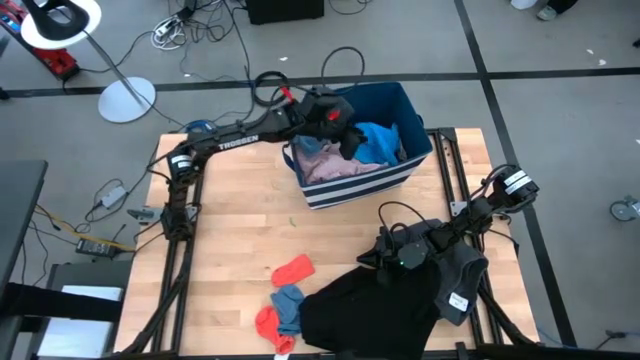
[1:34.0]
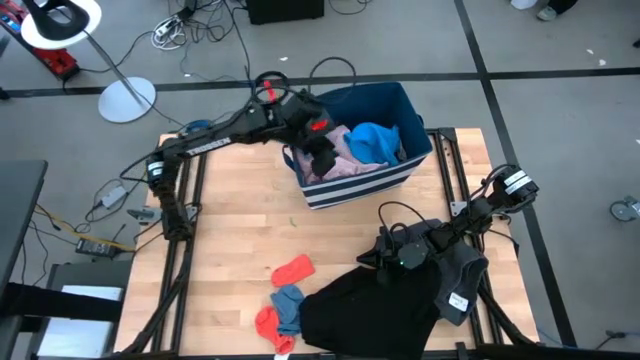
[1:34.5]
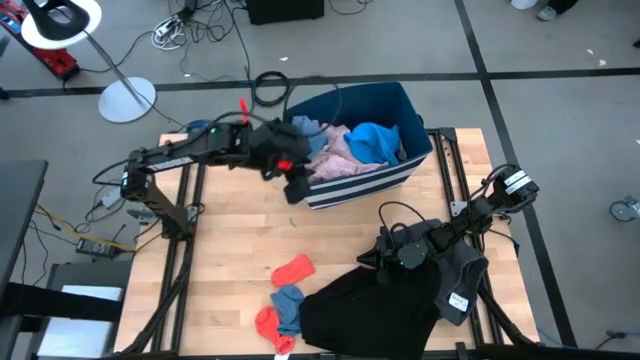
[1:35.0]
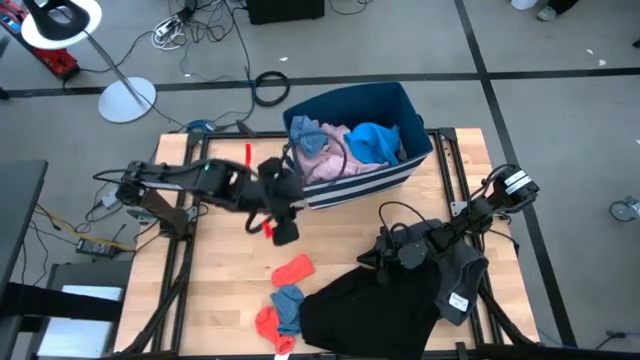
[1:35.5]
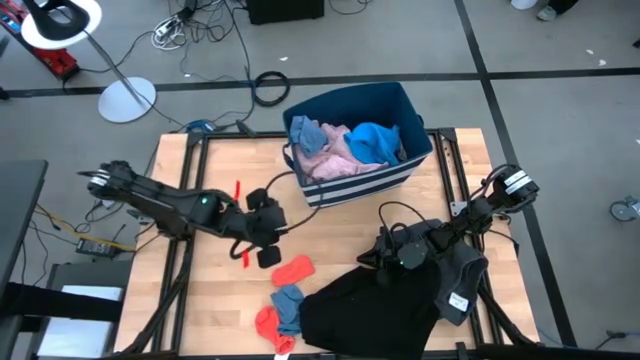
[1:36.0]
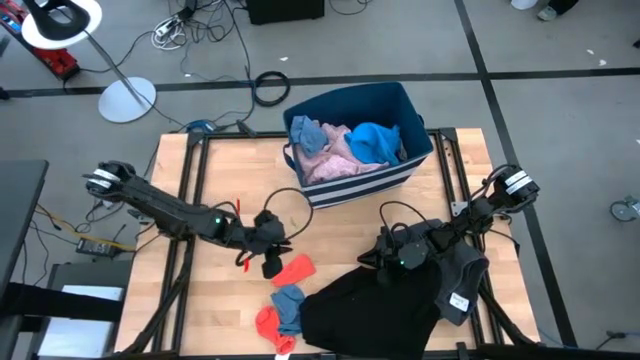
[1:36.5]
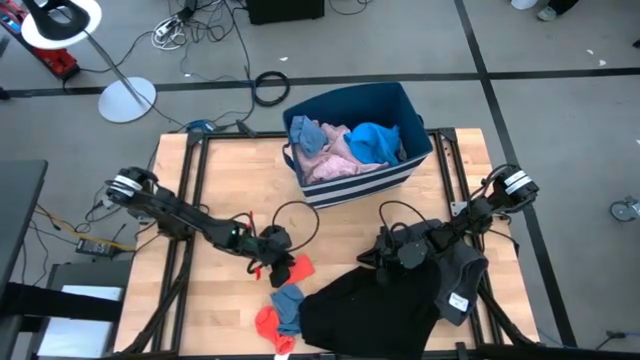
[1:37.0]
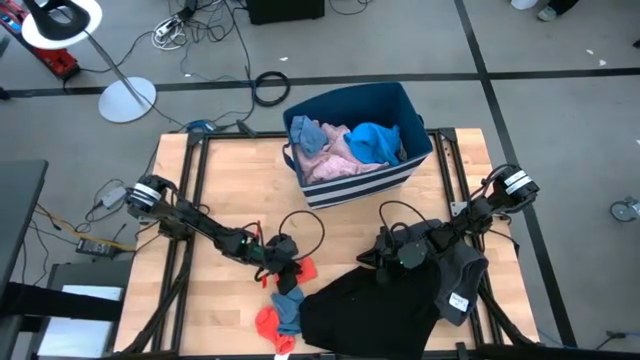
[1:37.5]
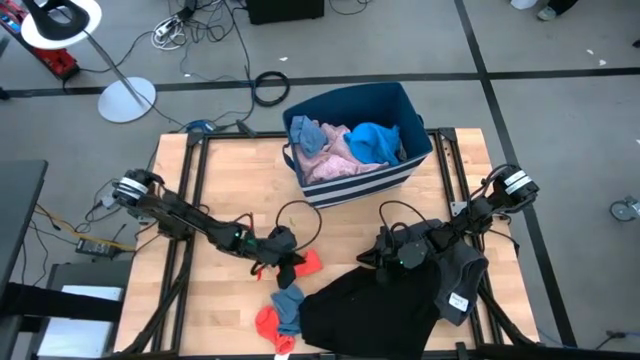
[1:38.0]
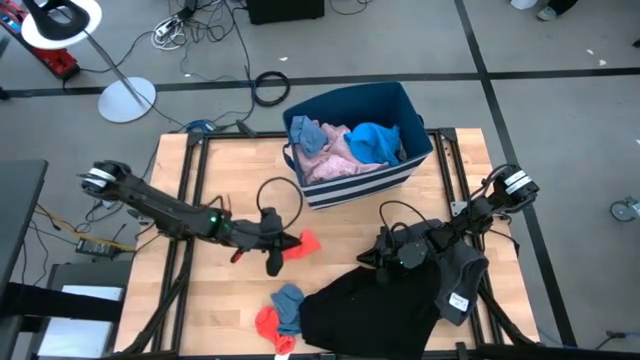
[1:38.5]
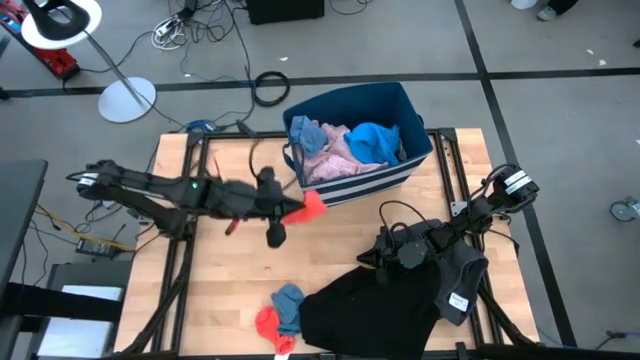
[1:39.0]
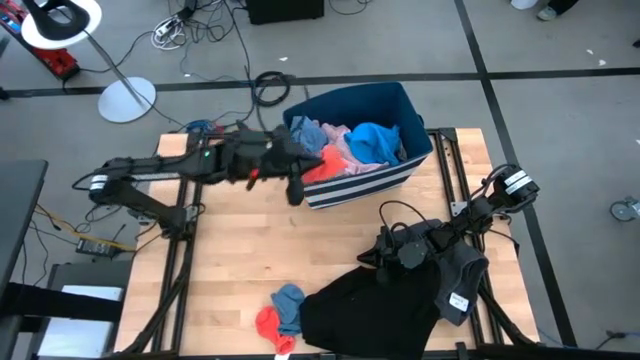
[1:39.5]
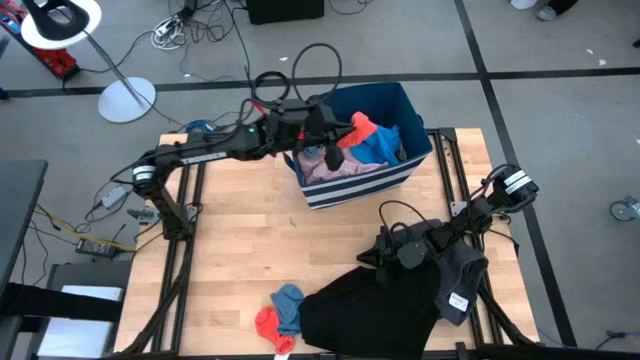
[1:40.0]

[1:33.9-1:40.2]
Task: Sort clothes
Put the top orange sock in the blue laundry bin organizer

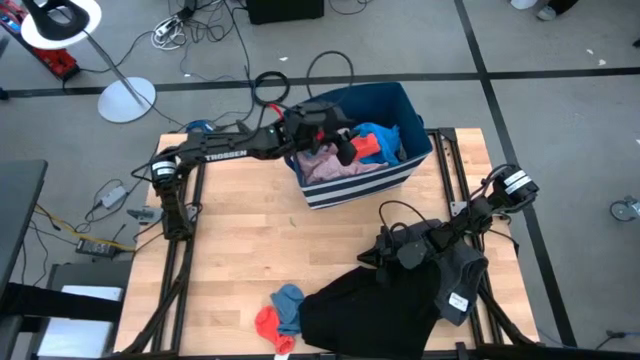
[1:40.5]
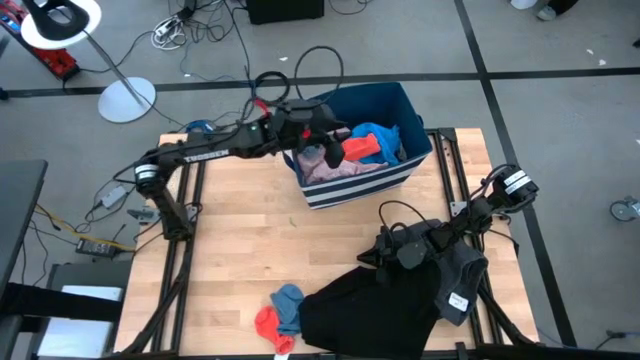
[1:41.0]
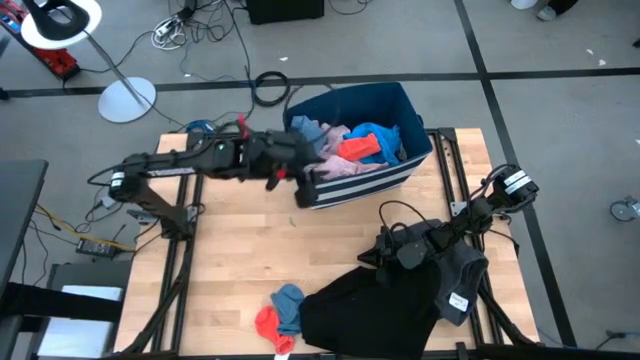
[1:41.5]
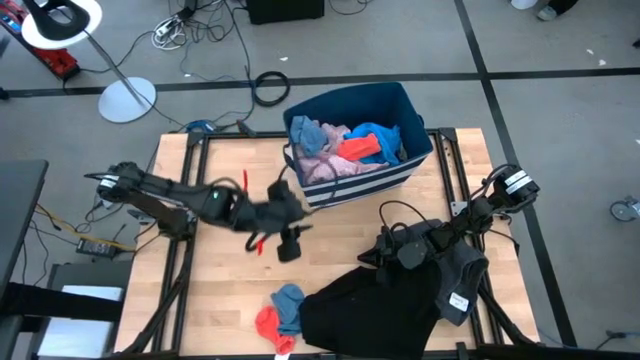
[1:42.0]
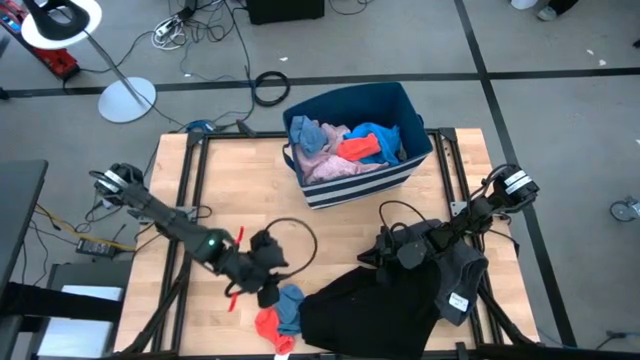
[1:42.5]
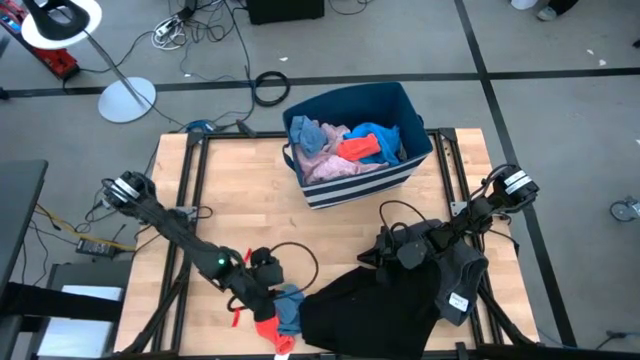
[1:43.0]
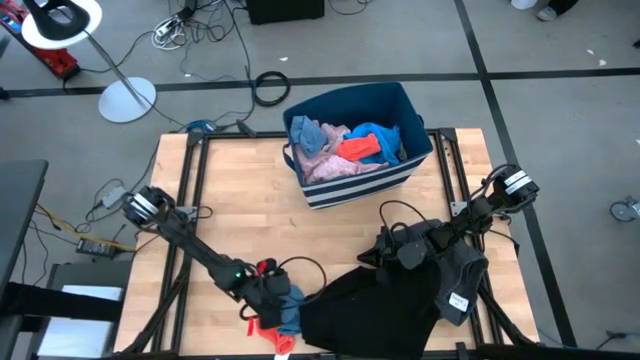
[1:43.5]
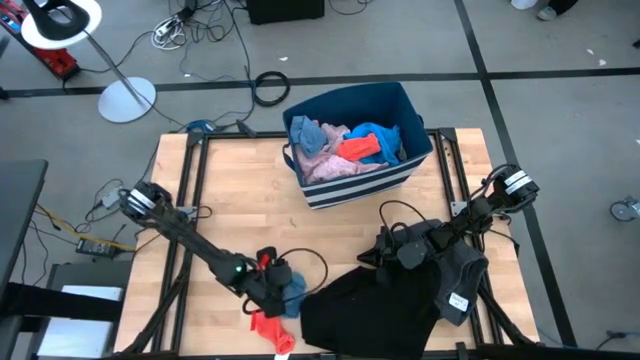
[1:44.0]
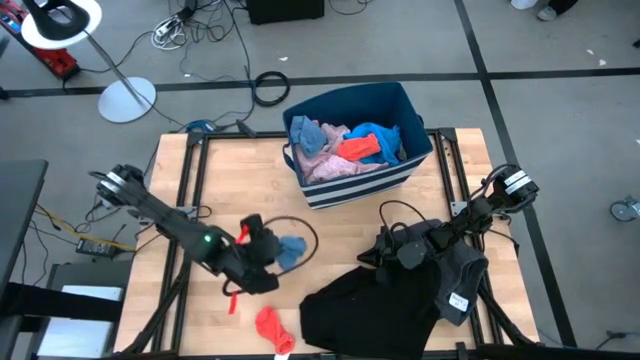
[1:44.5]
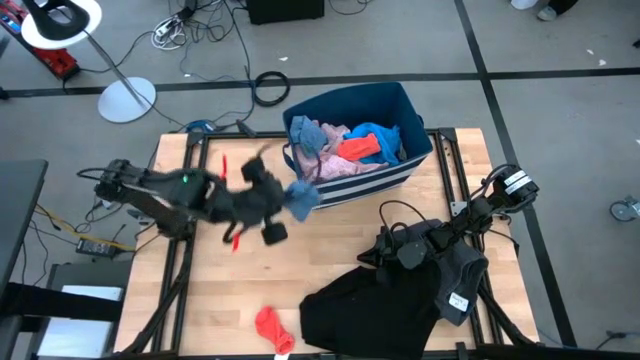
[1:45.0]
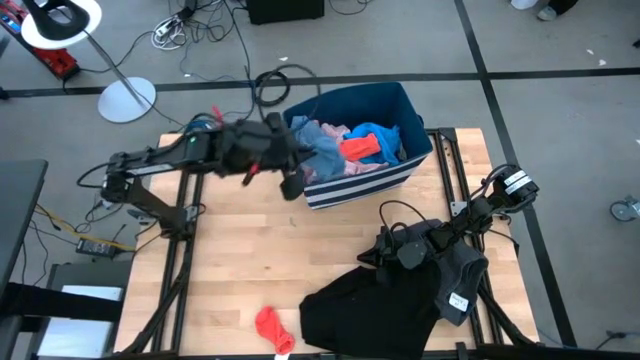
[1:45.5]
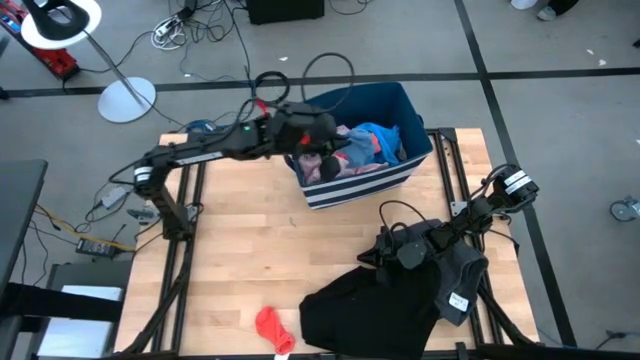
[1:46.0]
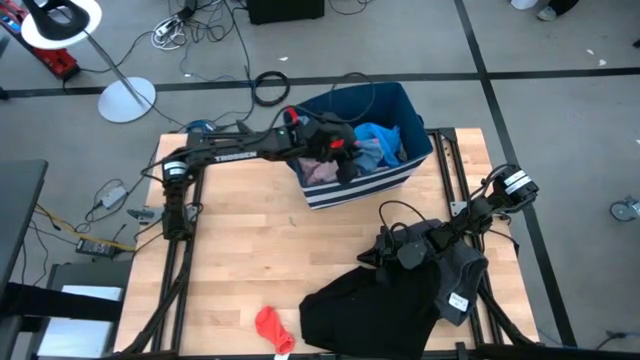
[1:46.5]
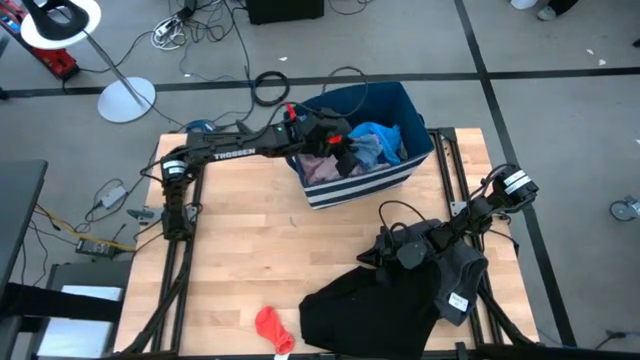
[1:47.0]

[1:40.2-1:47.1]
Put the gray sock in the blue laundry bin organizer

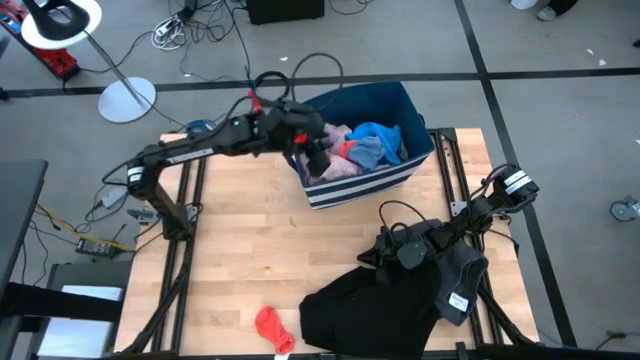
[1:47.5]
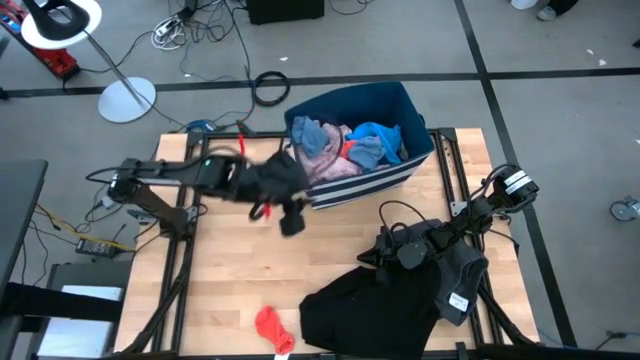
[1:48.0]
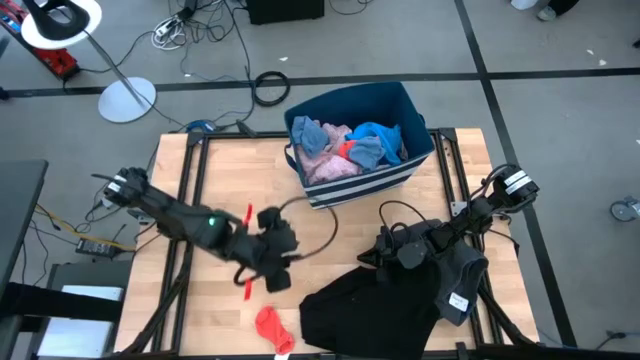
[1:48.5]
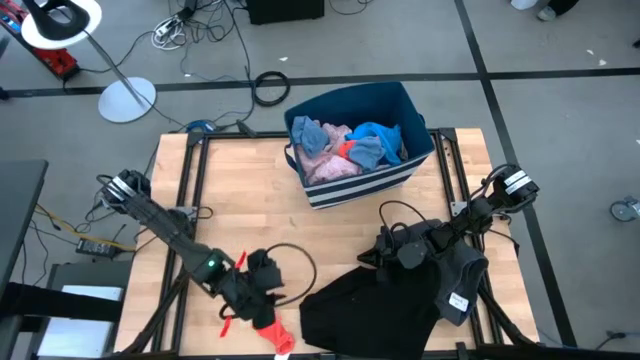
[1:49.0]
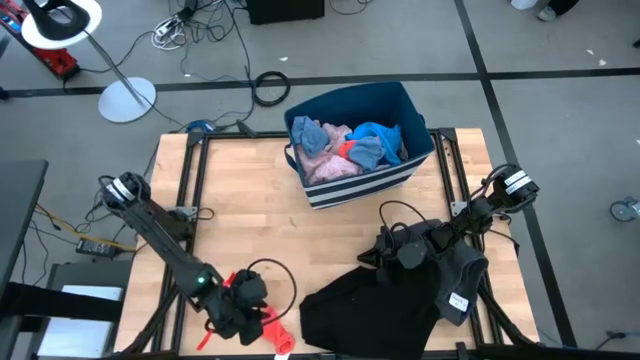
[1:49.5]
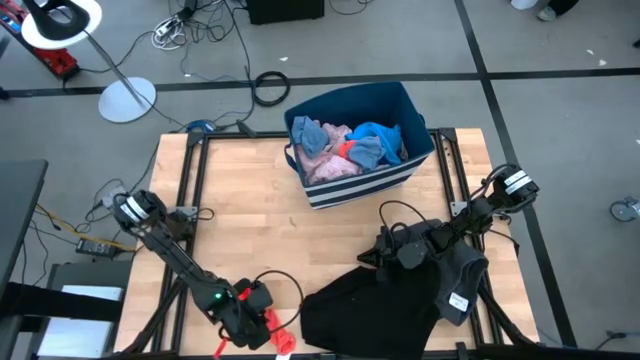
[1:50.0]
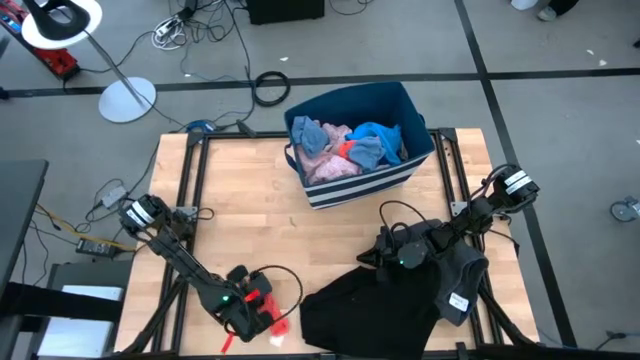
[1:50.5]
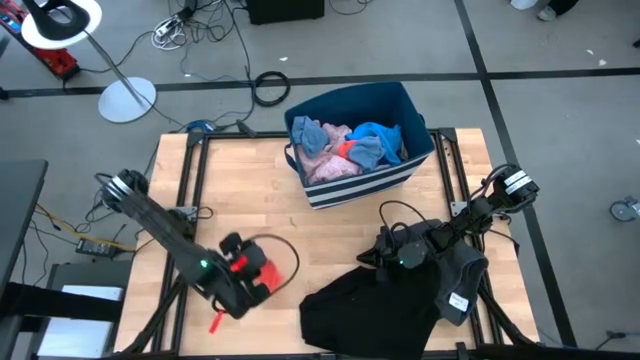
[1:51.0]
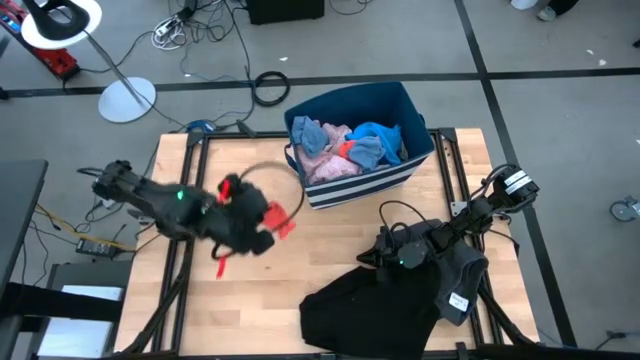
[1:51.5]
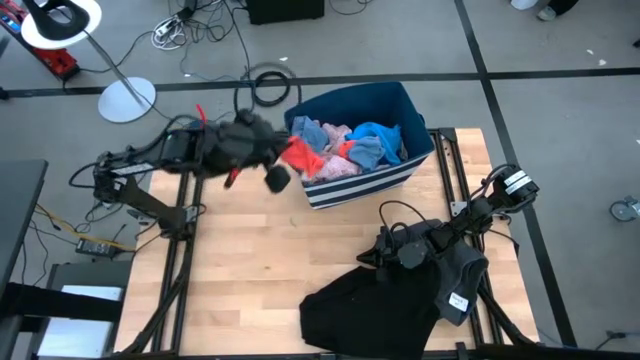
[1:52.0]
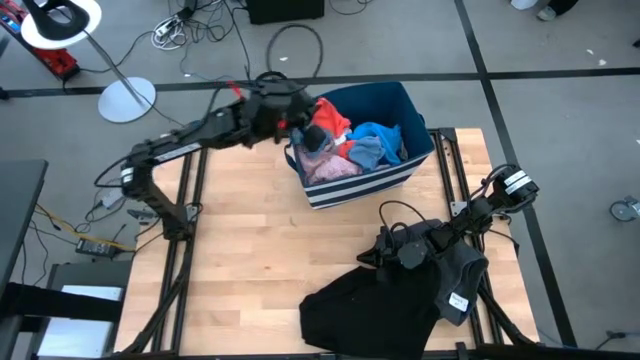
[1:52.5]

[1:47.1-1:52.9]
Put the orange sock in the blue laundry bin organizer

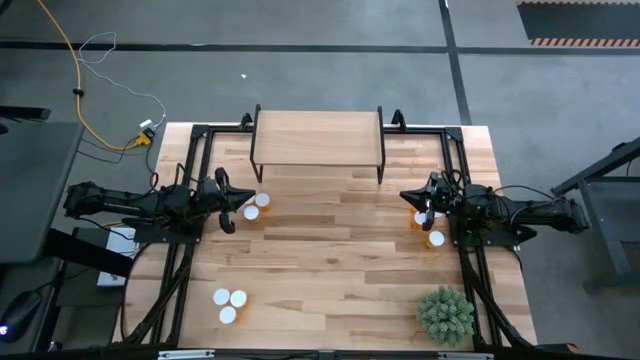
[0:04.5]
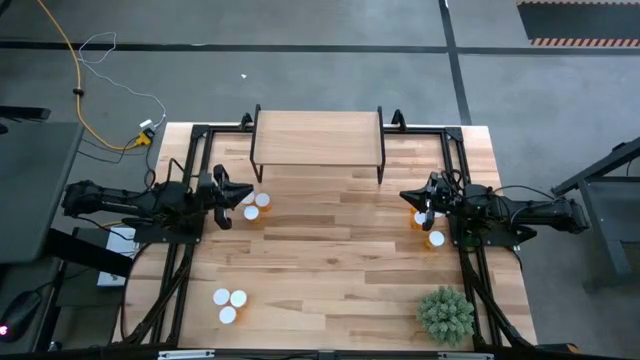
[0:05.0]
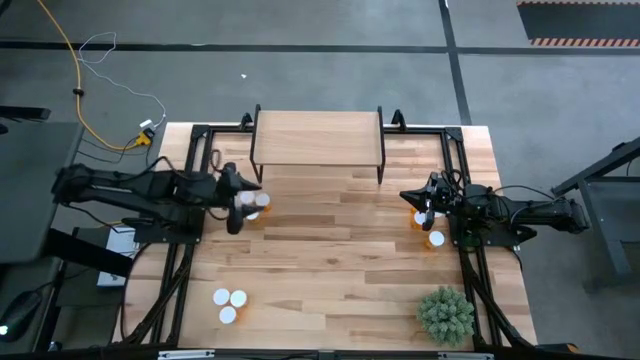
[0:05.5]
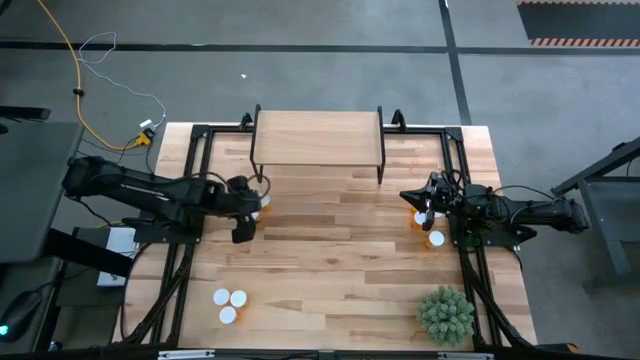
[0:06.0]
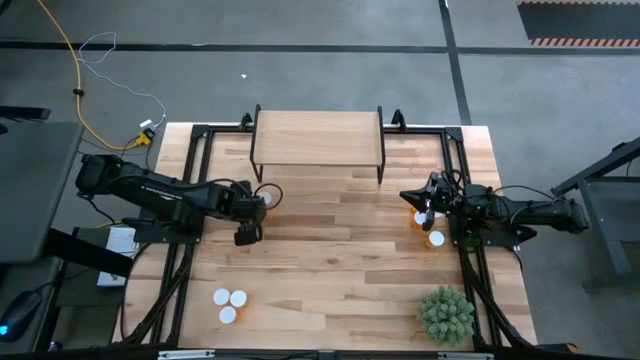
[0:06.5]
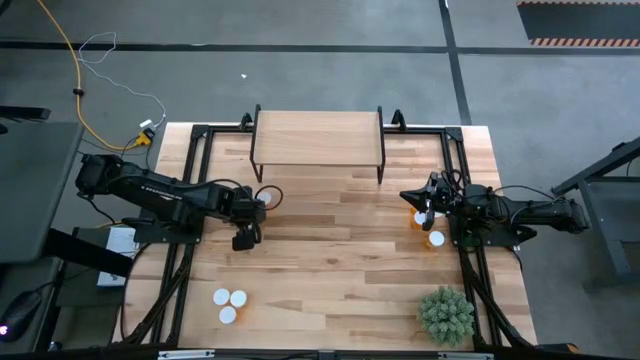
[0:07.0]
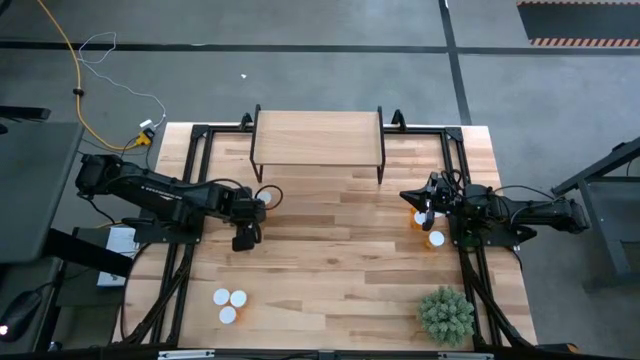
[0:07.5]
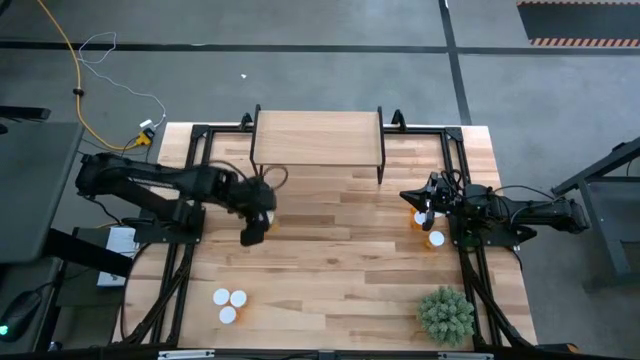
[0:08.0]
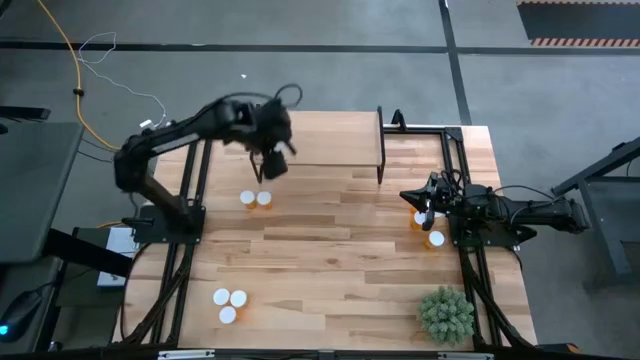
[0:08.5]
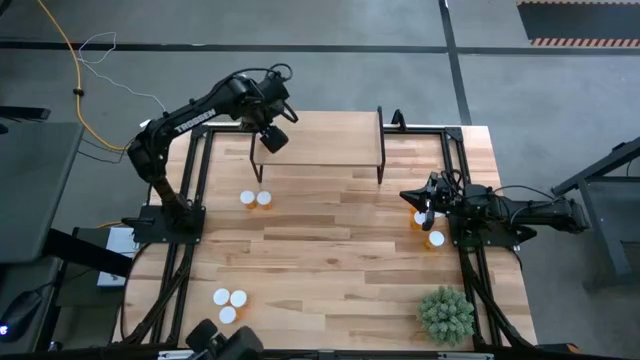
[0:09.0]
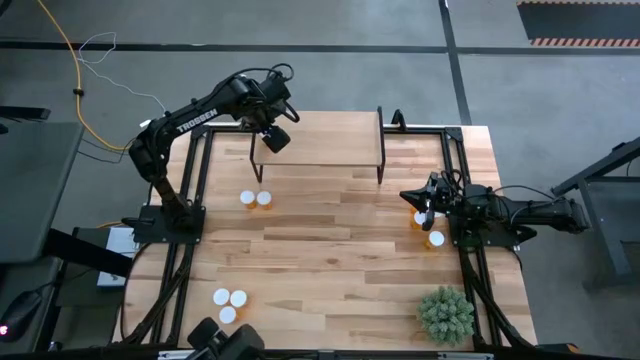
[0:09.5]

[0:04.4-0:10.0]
Task: Pick and place medicine bottles onto shelf by color
Put the orange pill bottle on the shelf
